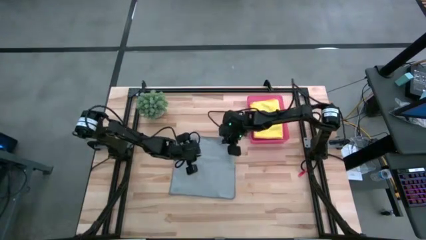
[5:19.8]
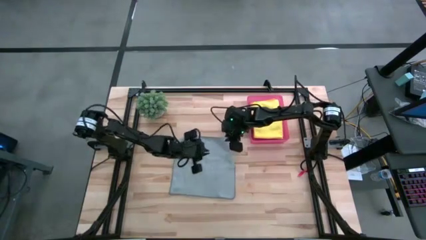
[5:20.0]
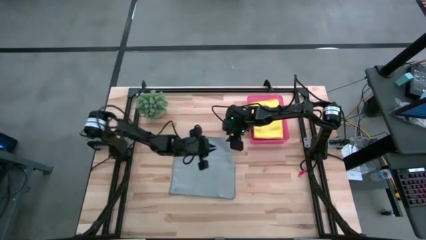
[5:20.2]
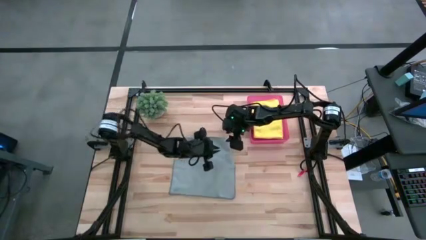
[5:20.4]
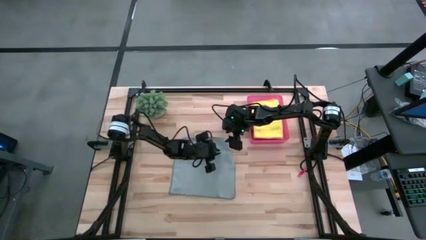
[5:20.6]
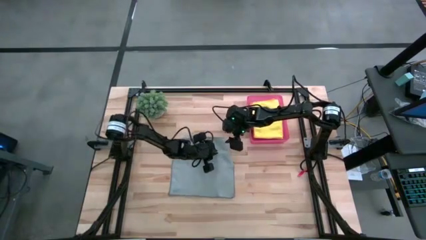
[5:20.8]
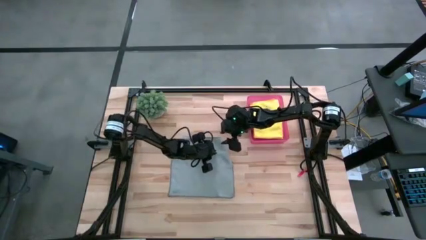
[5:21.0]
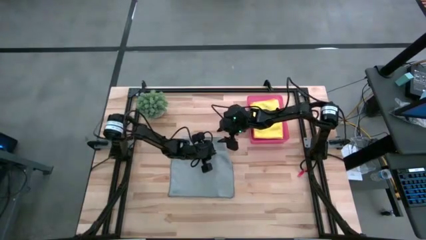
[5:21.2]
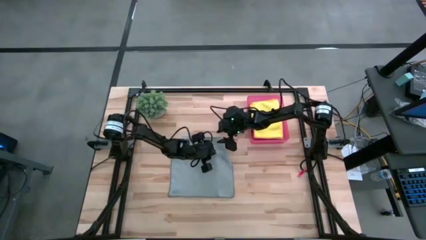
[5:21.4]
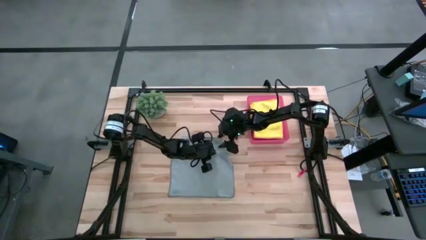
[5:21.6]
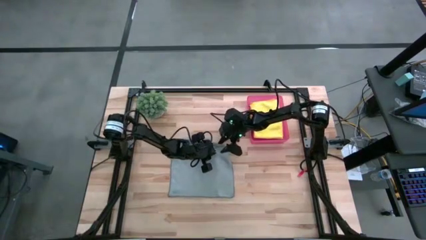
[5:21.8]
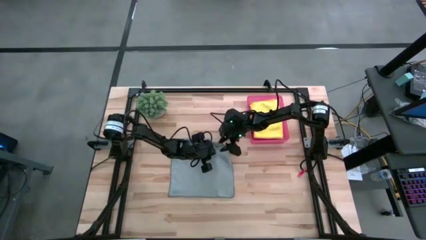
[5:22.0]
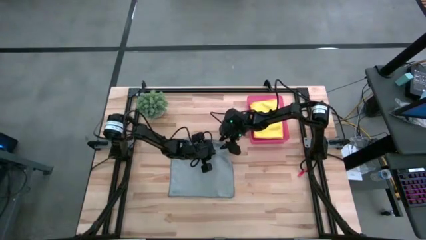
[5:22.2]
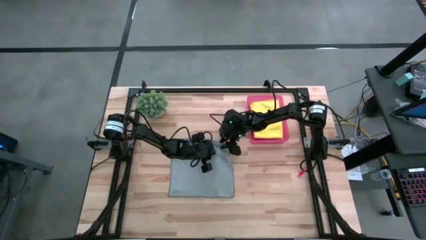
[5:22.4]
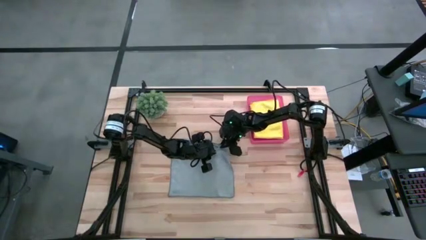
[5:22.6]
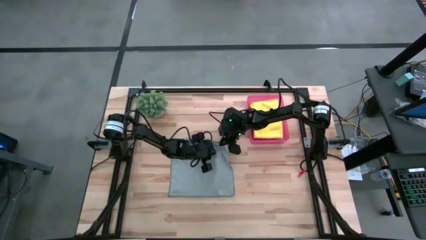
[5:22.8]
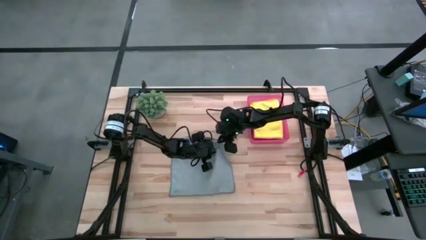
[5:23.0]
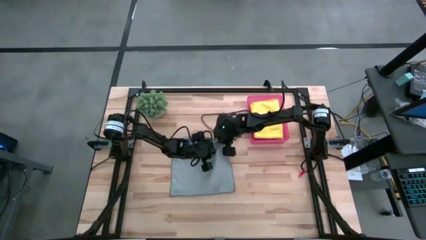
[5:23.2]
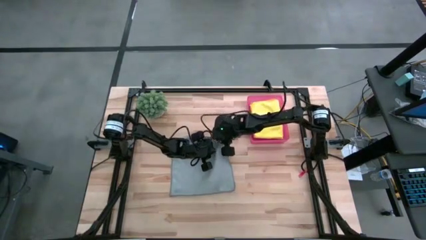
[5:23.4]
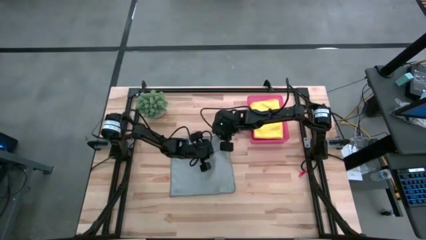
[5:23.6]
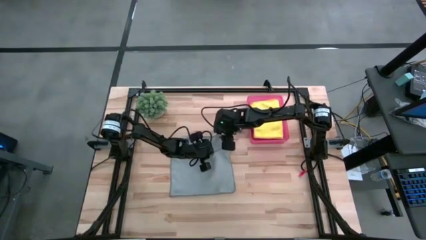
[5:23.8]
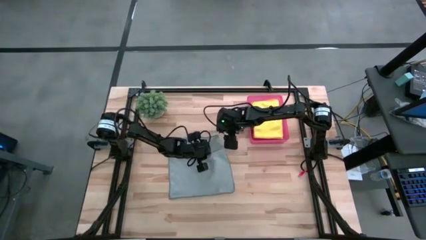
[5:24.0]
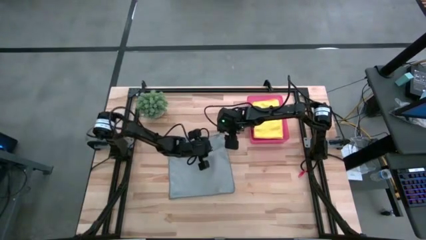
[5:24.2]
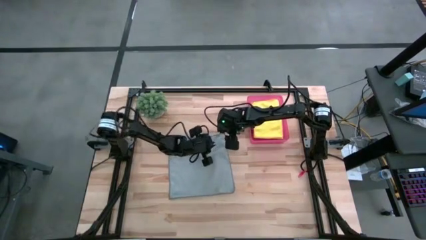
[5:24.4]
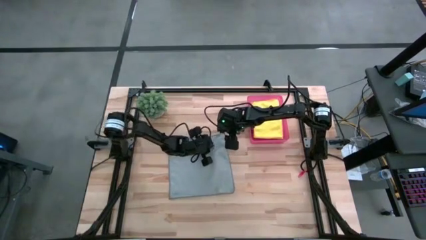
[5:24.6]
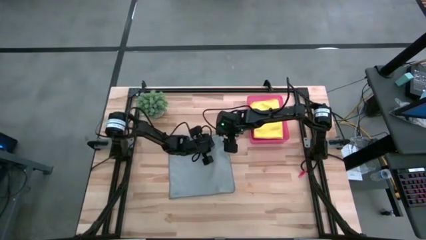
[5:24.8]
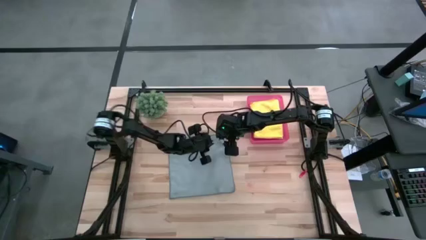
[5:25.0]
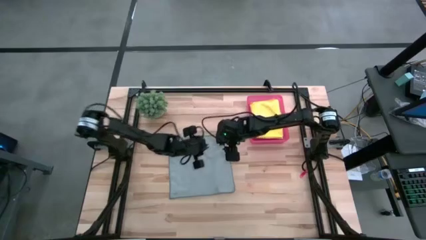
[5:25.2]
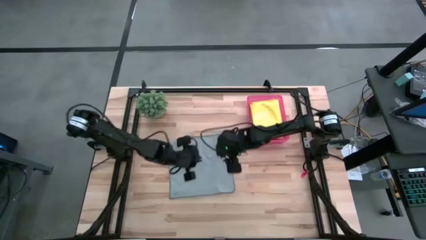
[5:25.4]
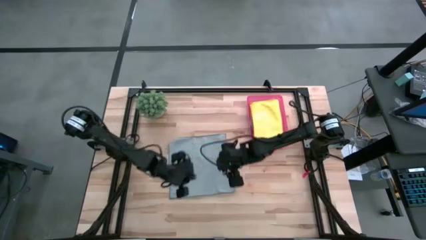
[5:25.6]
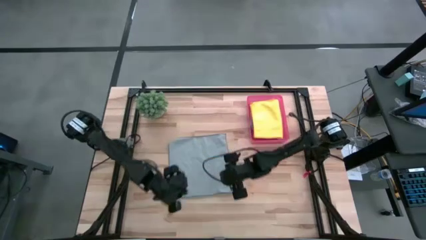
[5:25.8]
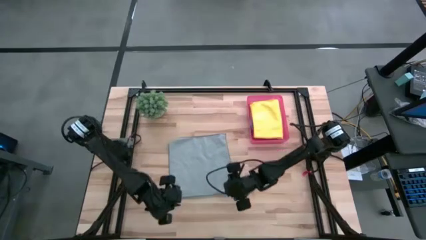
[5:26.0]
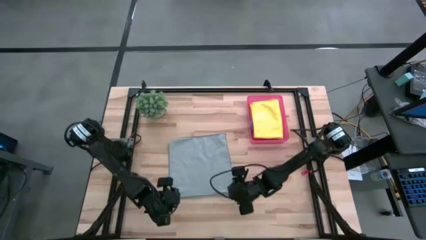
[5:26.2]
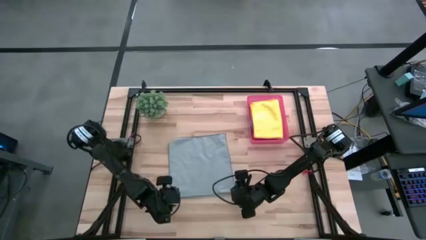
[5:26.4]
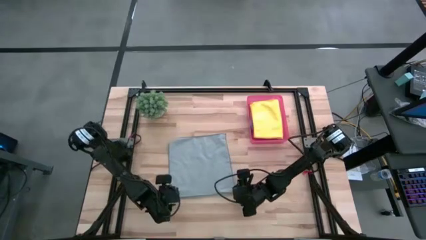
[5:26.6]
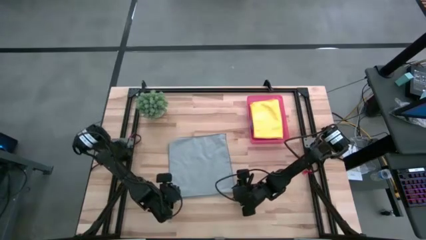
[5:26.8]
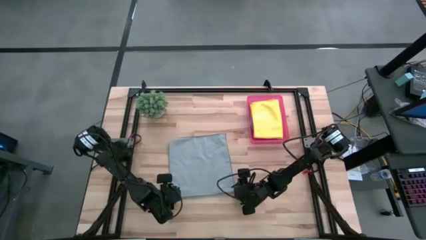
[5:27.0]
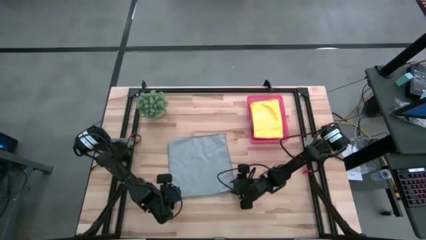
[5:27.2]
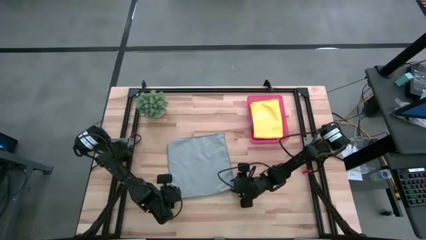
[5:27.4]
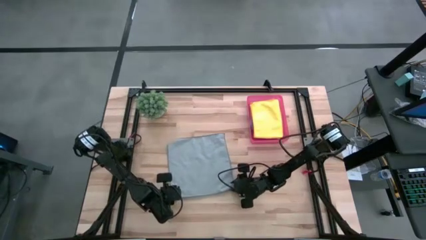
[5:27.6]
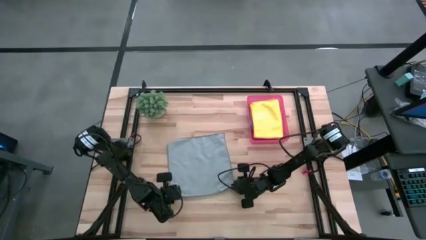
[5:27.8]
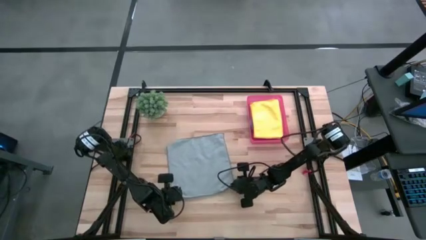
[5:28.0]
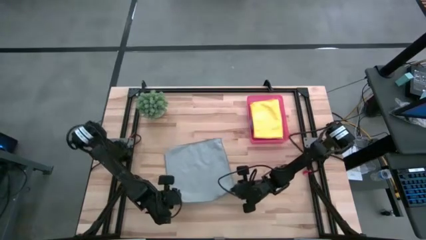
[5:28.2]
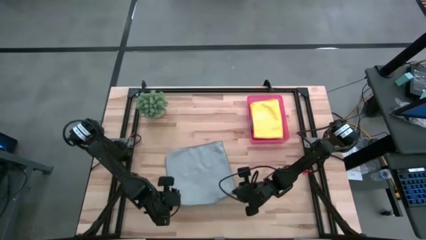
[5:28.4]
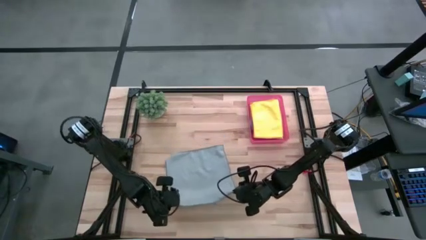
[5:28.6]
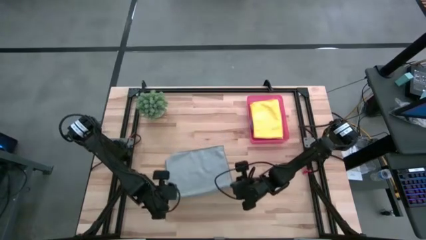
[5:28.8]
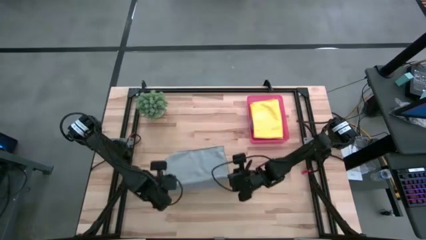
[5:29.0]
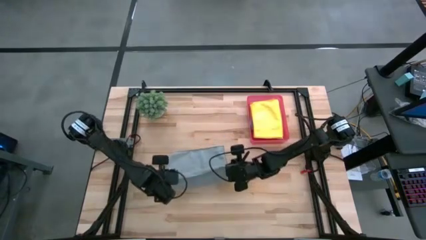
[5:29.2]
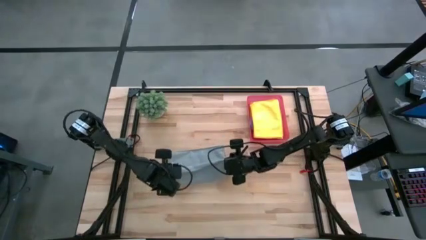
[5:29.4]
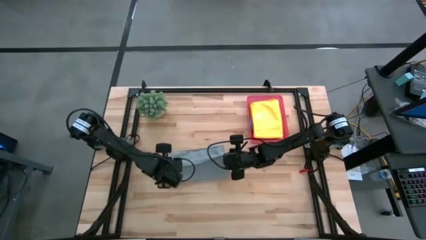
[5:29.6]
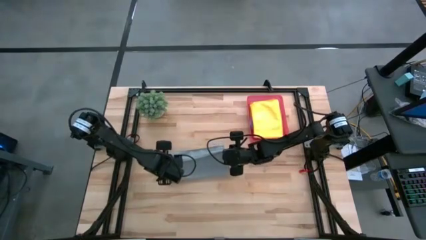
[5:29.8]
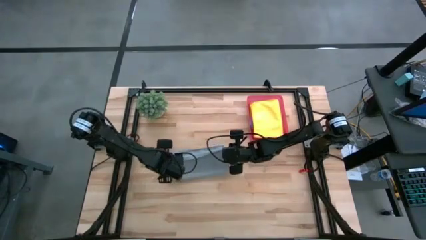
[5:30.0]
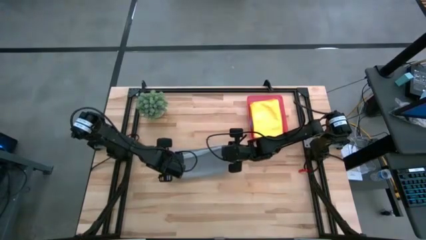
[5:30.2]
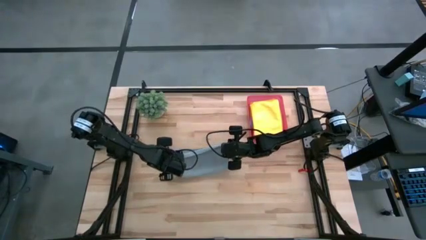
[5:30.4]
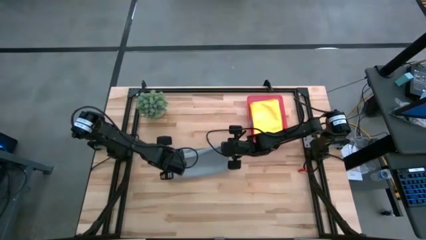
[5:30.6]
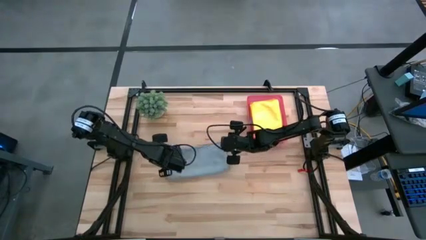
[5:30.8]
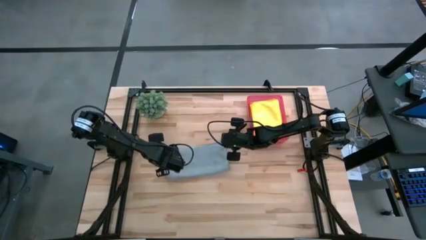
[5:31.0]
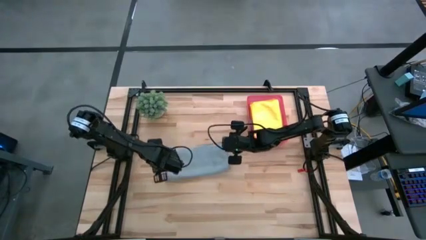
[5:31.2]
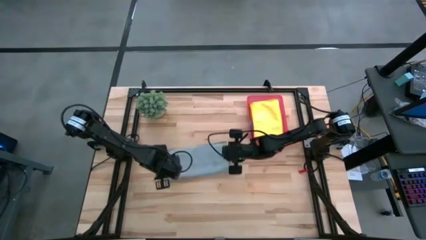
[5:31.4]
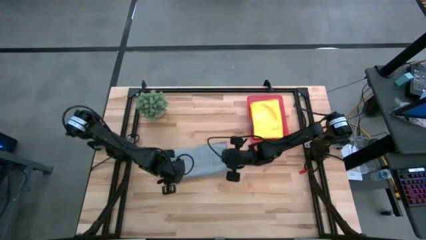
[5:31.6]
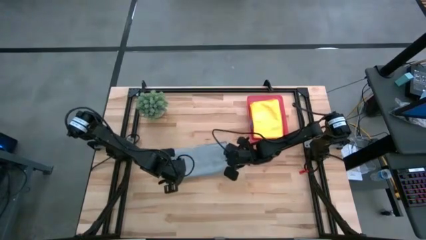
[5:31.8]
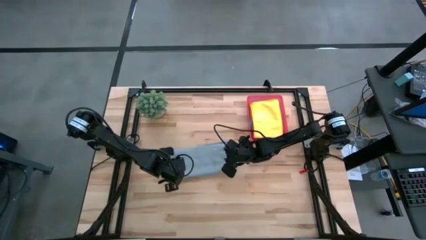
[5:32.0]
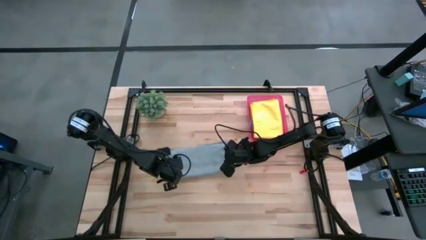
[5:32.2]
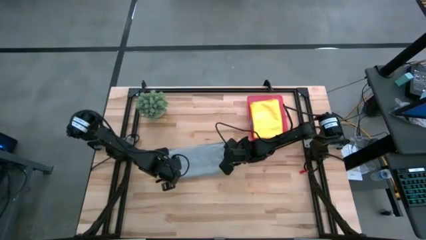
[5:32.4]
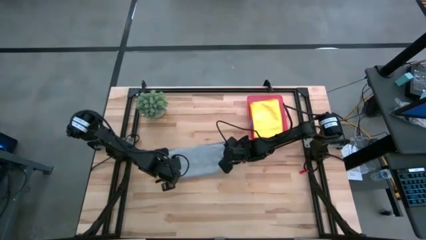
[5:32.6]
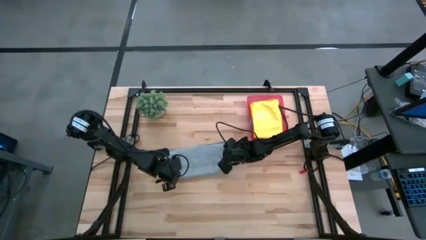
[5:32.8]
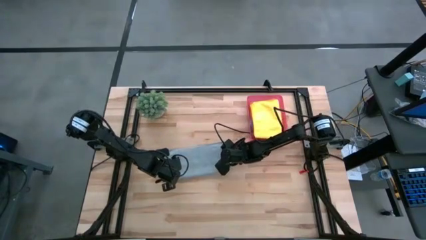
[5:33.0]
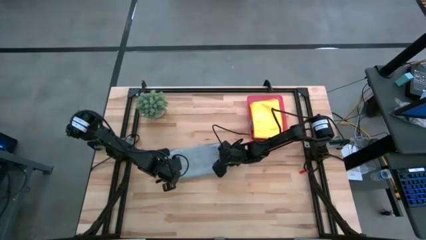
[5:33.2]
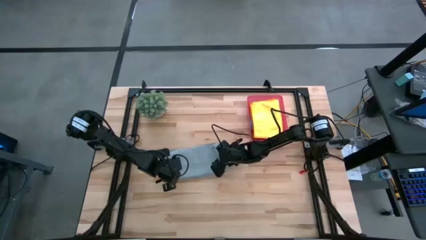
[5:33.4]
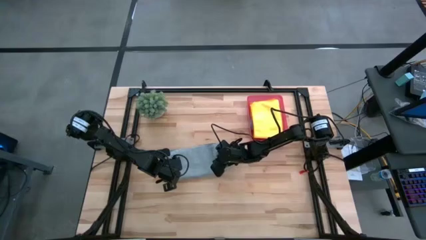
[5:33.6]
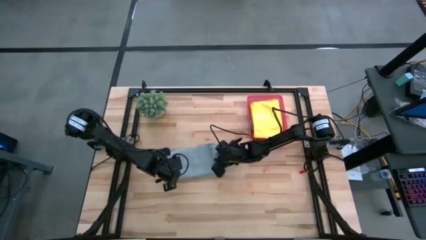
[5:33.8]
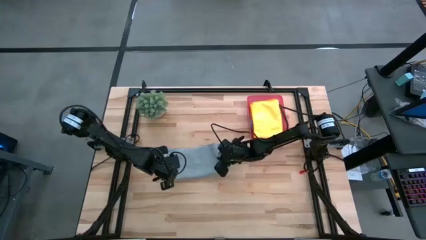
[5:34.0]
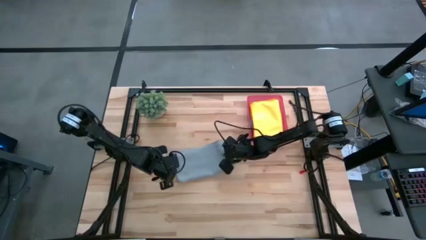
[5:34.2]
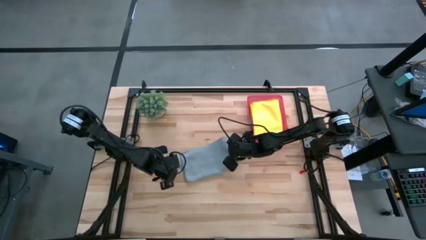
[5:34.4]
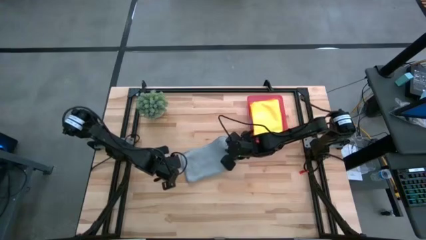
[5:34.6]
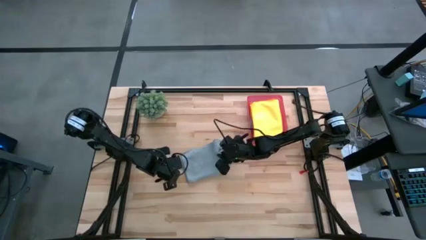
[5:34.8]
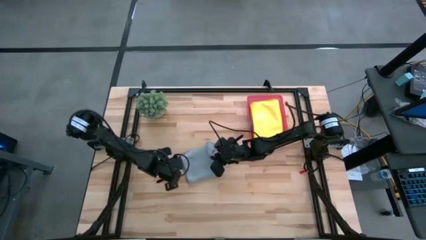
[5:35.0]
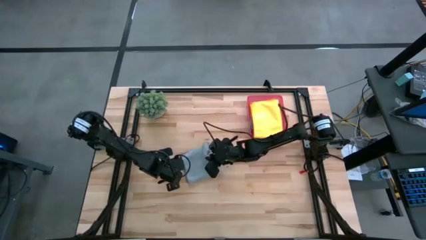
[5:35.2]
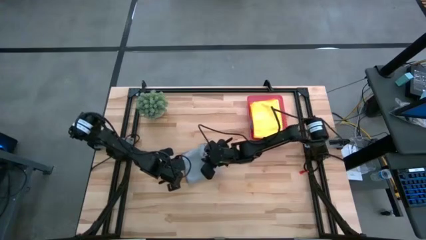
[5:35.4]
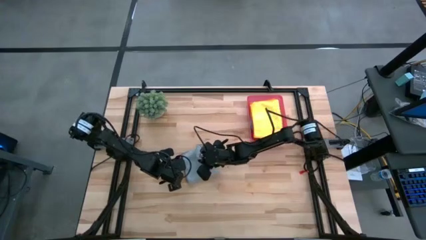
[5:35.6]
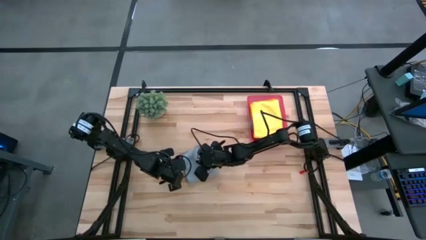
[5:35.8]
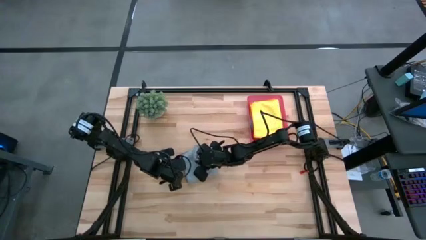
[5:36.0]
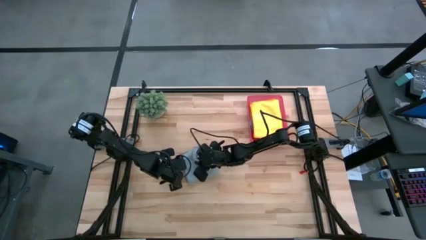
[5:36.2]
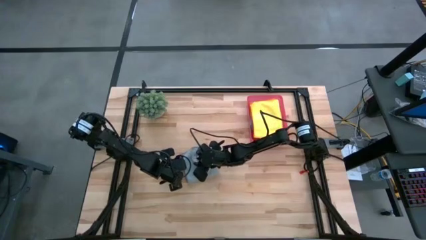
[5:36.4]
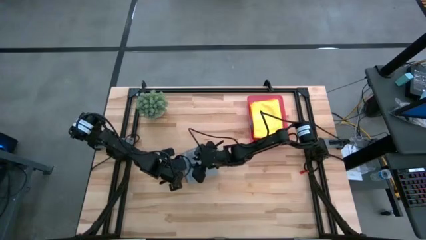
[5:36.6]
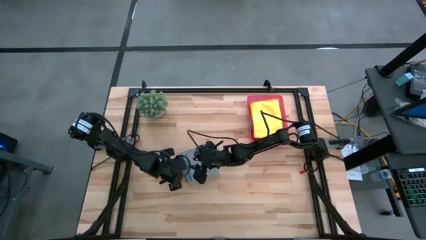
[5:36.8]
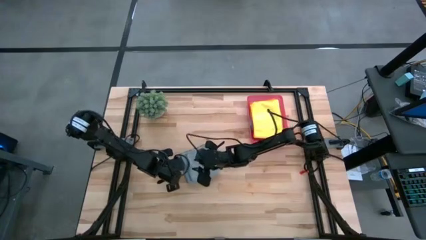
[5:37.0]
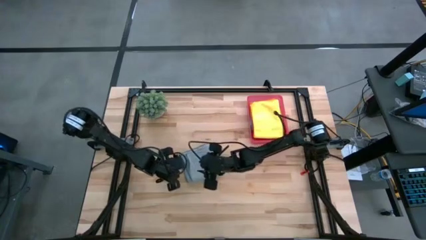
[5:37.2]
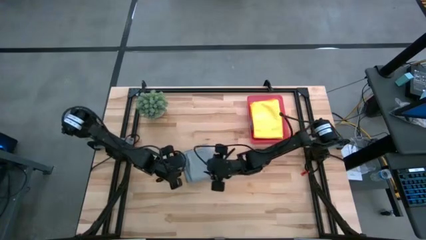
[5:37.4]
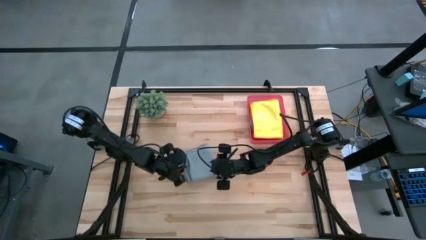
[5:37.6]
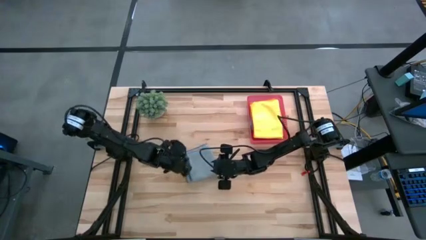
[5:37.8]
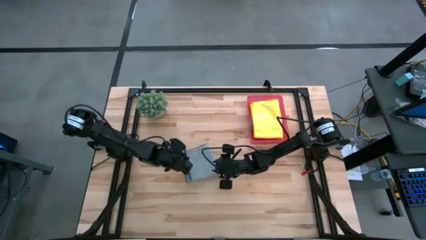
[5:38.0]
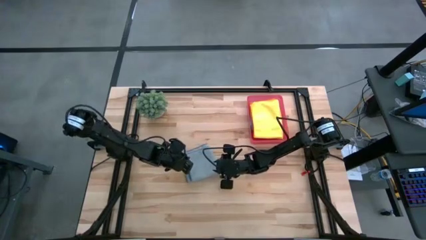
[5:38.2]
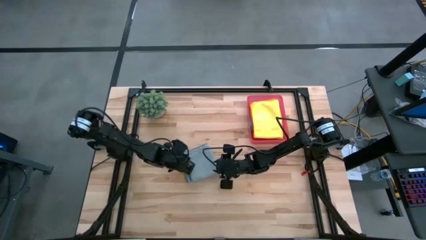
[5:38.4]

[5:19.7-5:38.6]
Task: Fold microfiber towels
Fold the gray microfiber cloth
